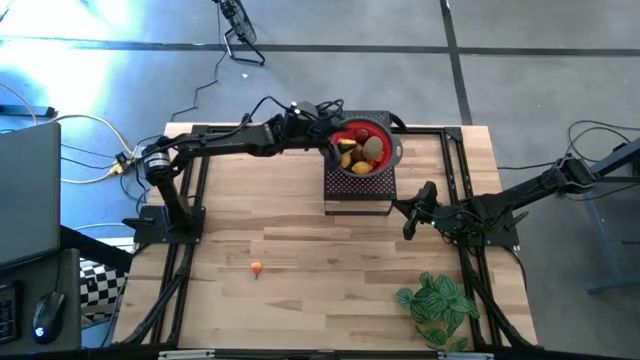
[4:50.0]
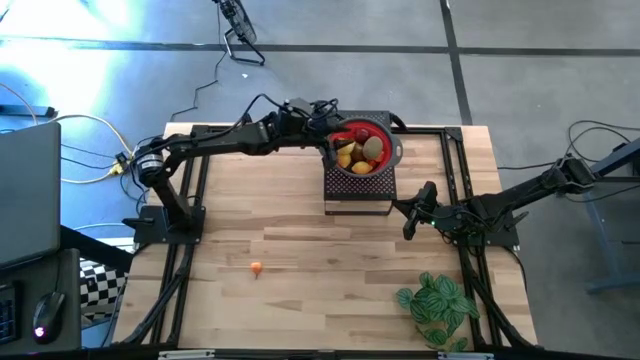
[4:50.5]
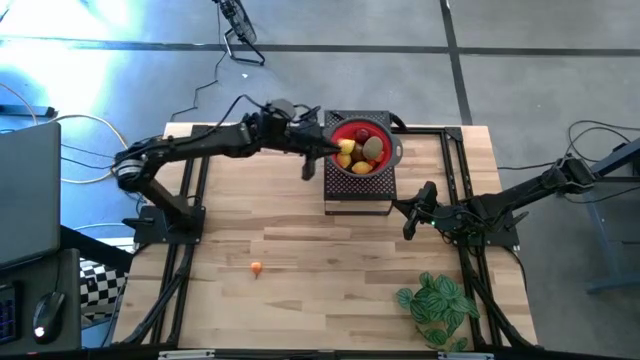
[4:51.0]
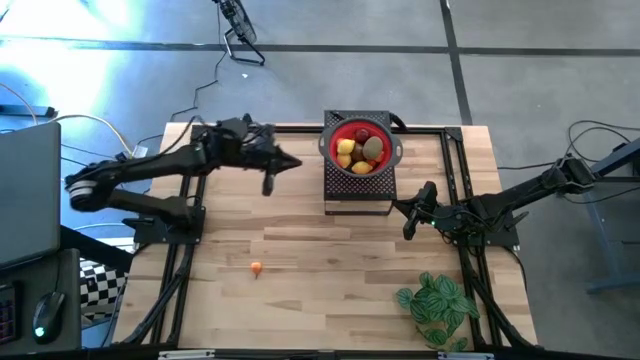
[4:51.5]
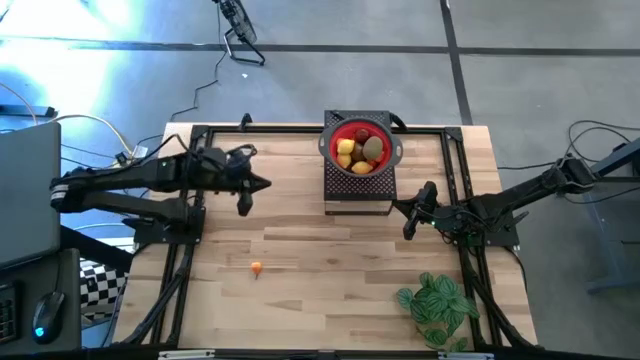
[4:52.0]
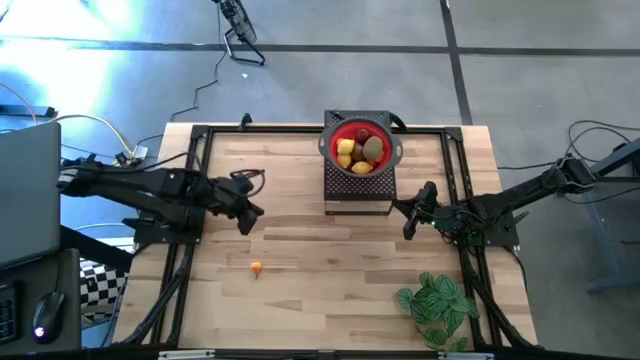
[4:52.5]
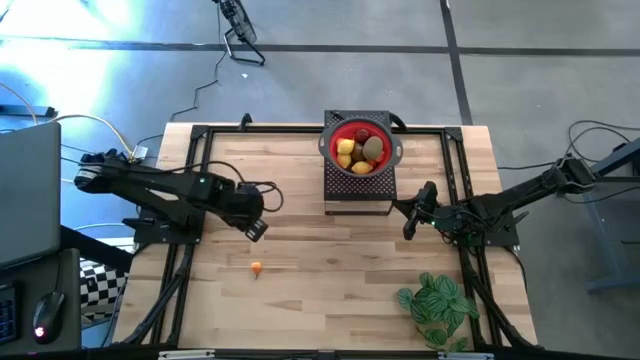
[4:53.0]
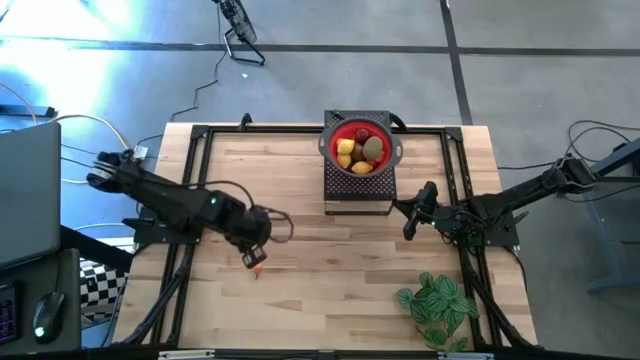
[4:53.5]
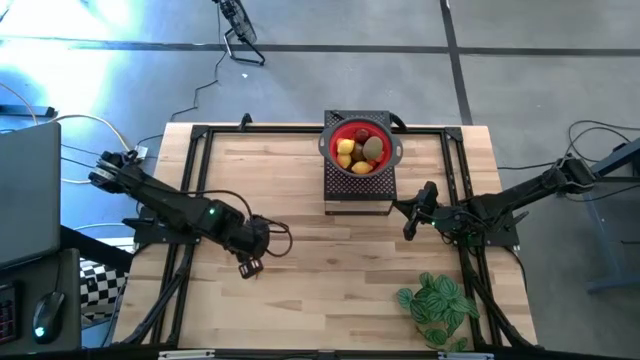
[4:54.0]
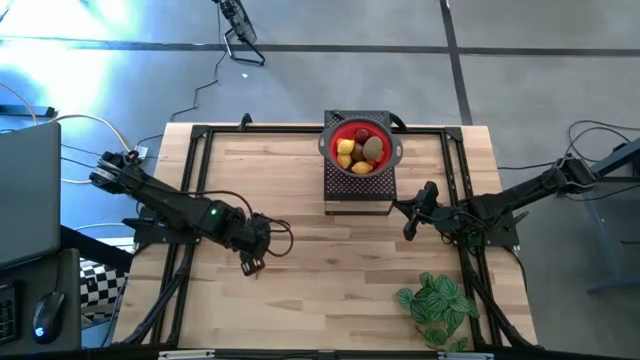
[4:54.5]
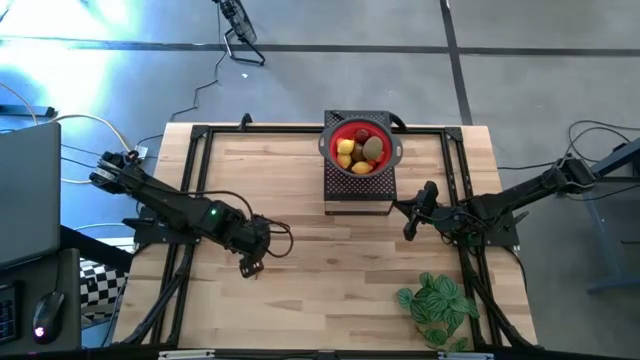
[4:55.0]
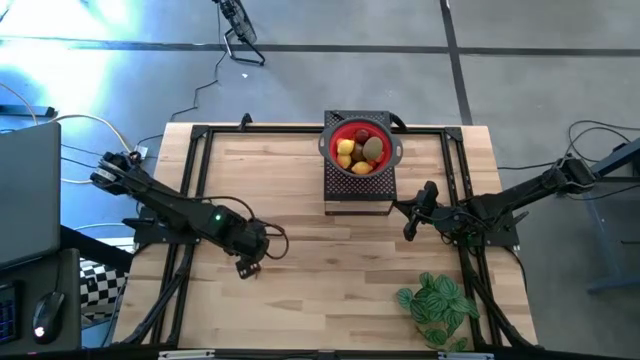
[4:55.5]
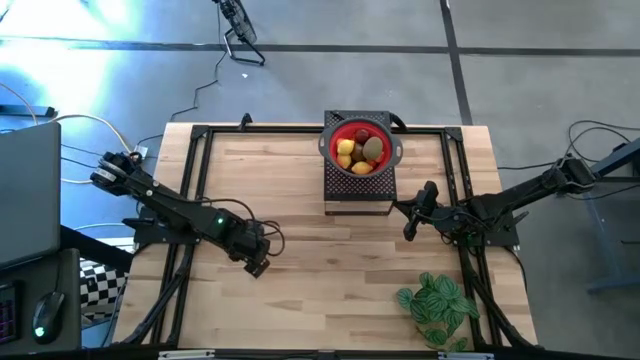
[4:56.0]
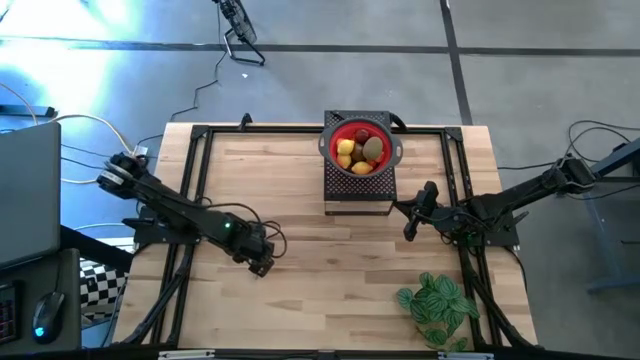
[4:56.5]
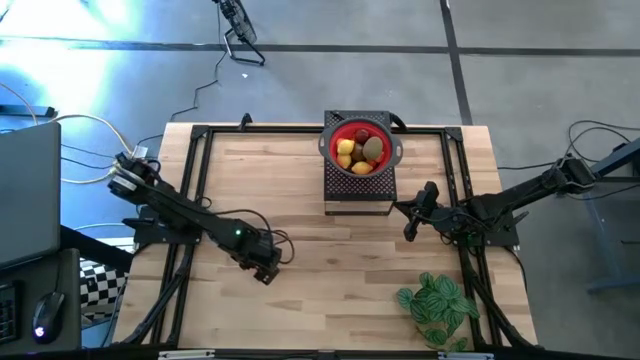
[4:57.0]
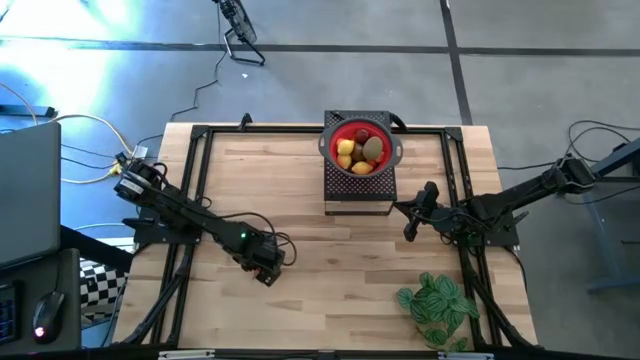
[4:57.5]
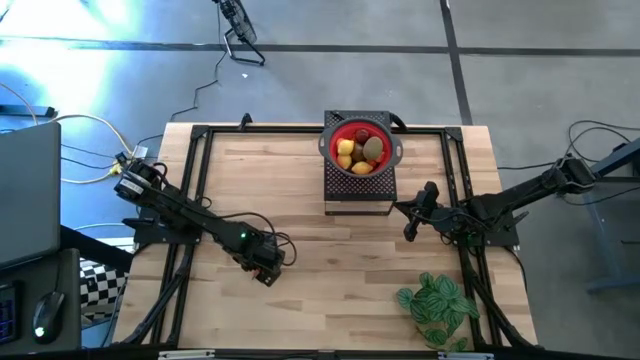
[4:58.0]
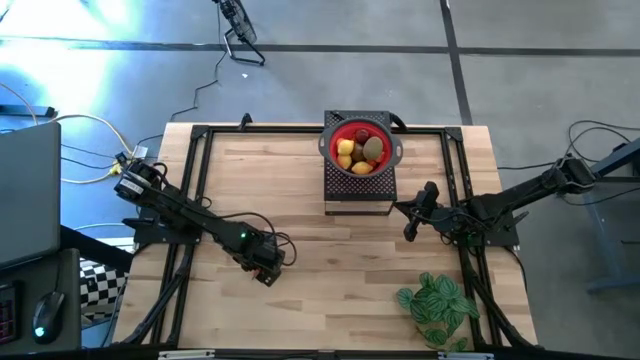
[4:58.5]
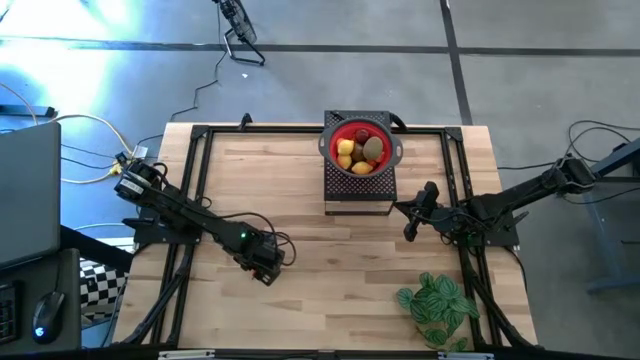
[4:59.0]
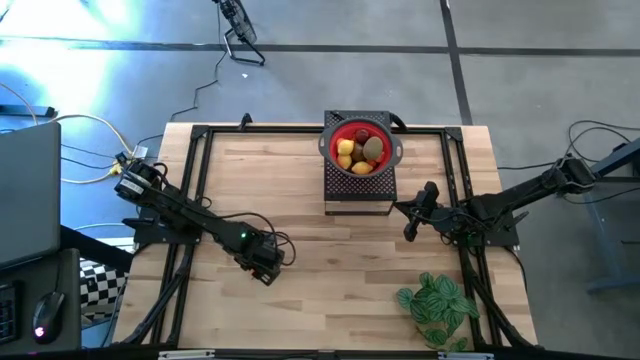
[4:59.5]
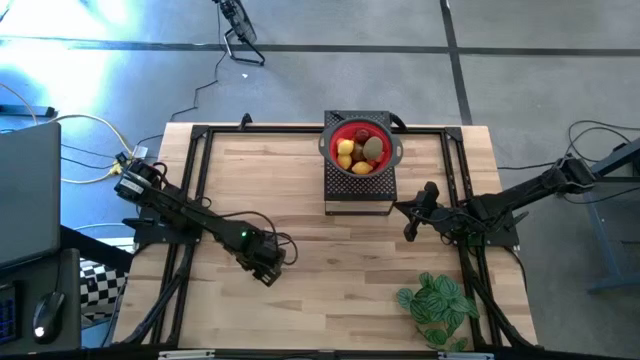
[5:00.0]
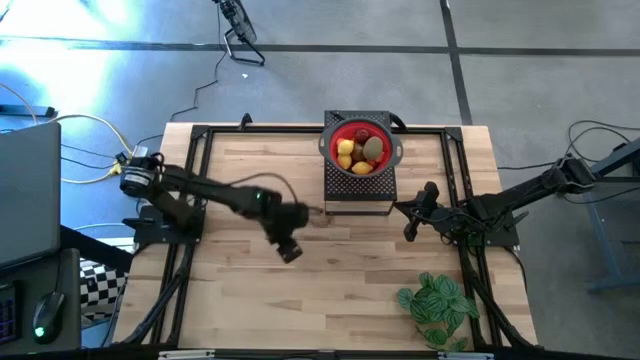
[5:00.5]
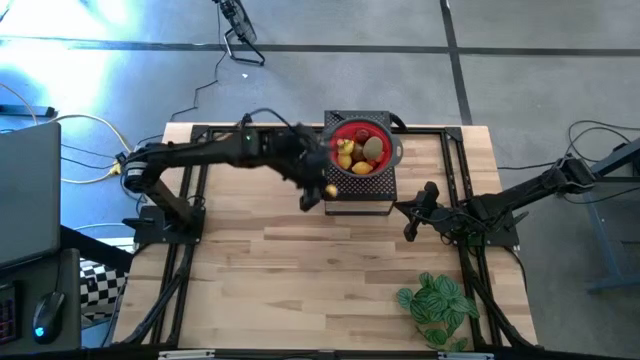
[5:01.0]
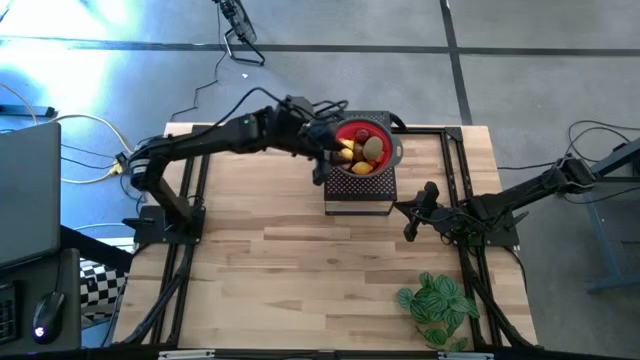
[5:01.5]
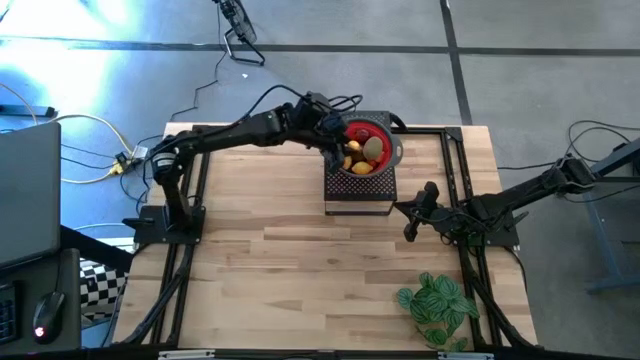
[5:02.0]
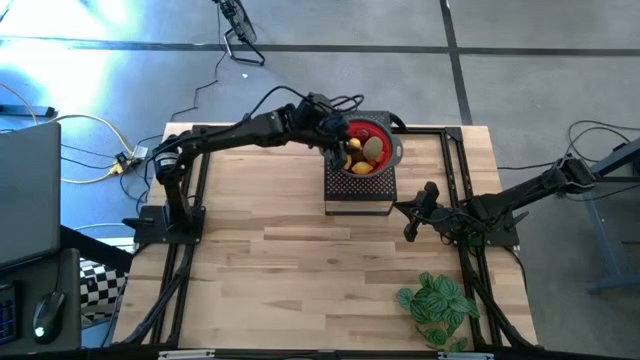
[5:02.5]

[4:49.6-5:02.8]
Task: Pick & Place Fruit
Put the orange pear into the red strainer bowl on the shelf

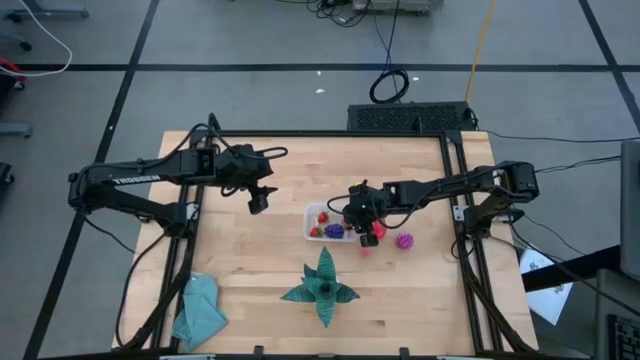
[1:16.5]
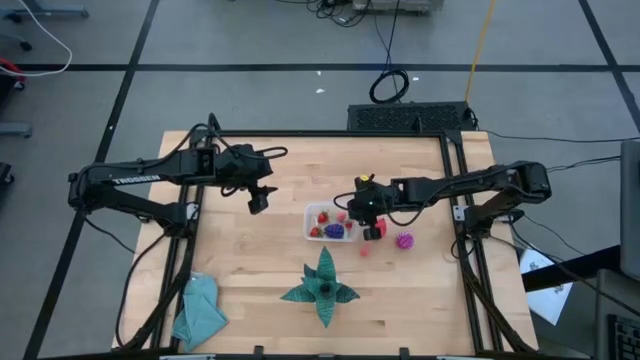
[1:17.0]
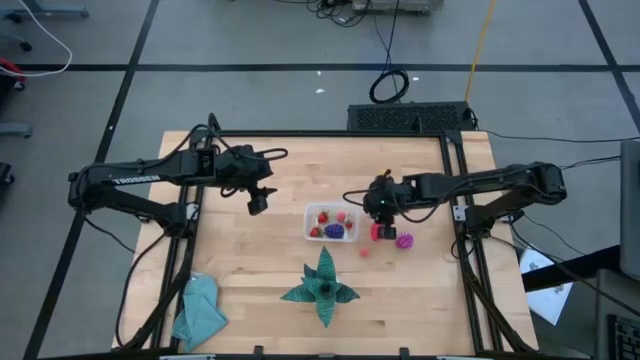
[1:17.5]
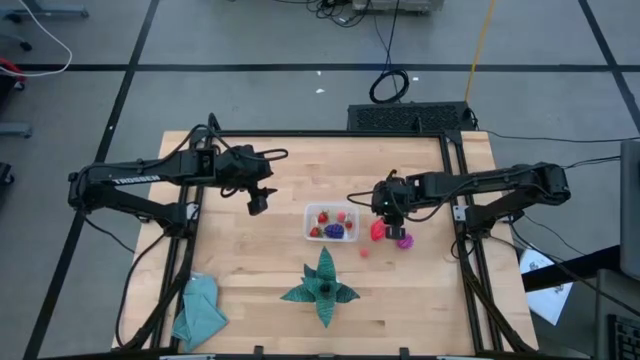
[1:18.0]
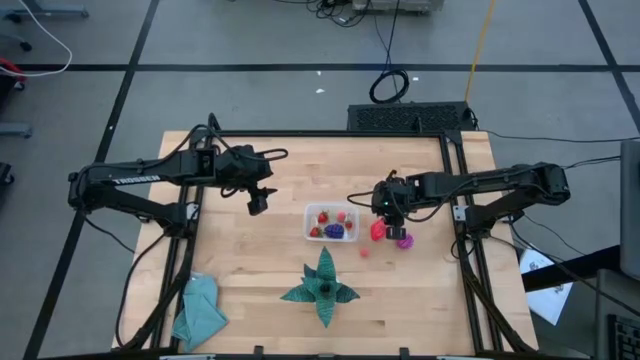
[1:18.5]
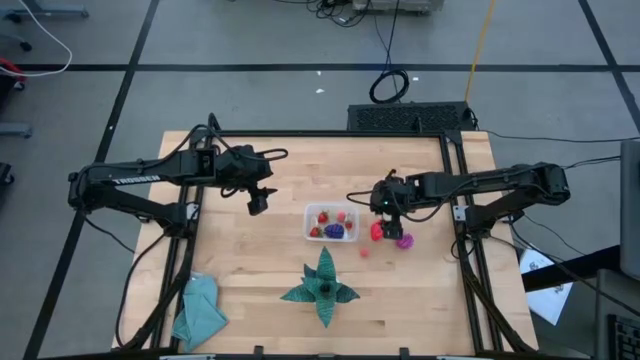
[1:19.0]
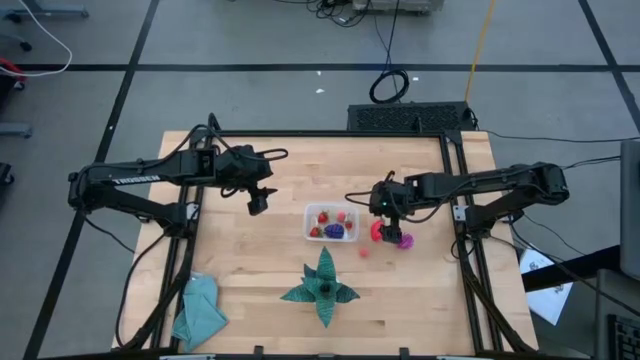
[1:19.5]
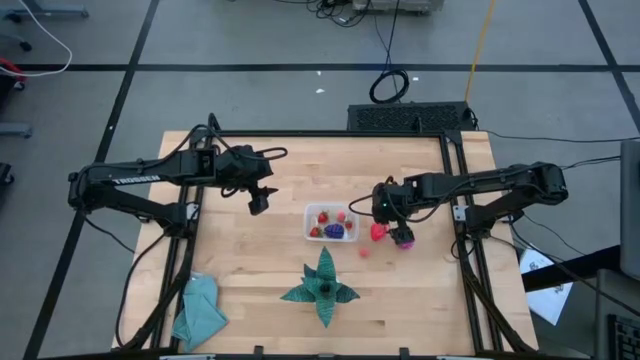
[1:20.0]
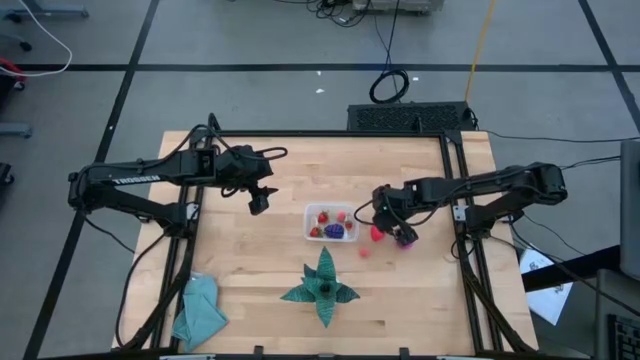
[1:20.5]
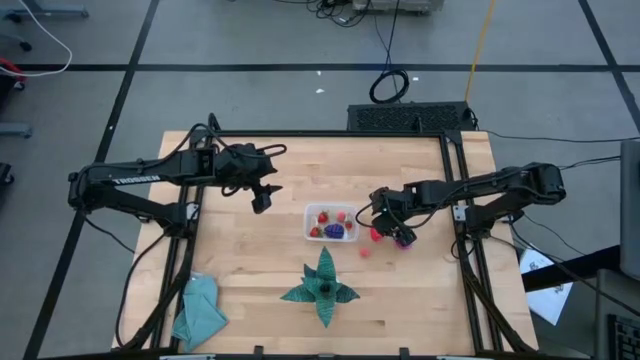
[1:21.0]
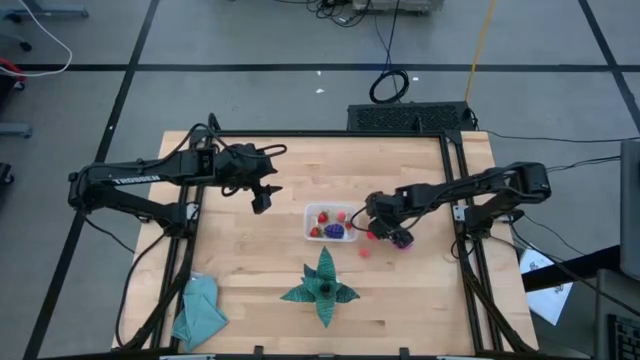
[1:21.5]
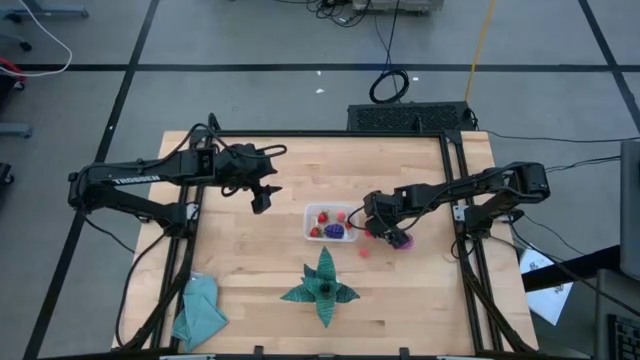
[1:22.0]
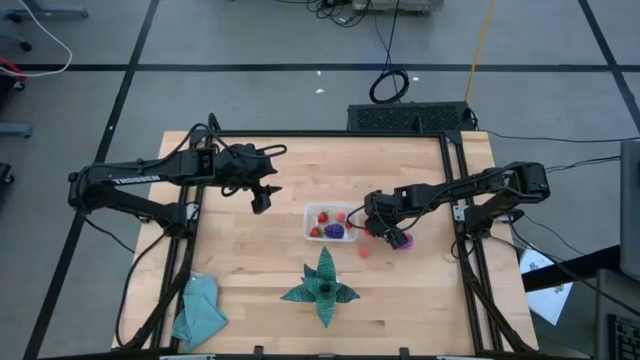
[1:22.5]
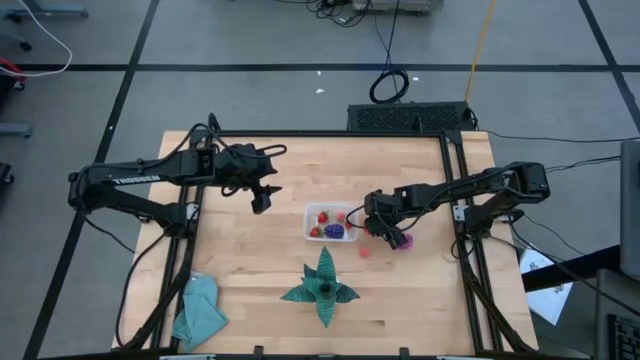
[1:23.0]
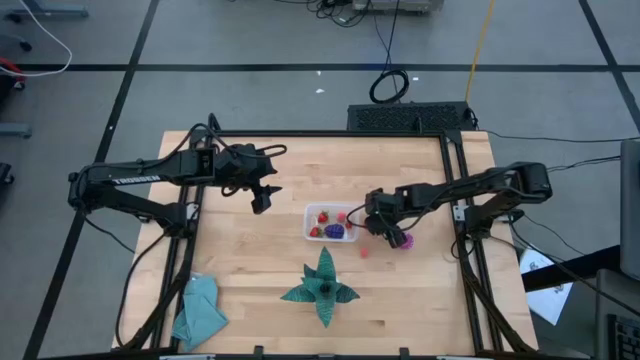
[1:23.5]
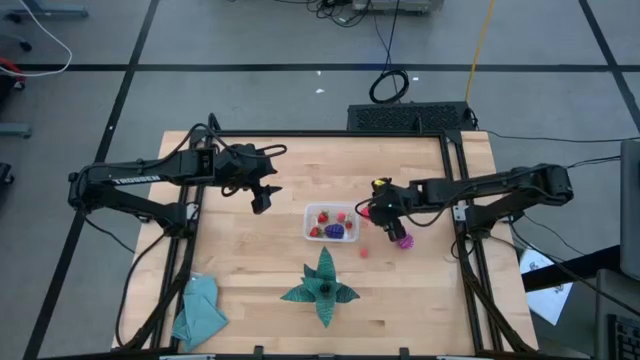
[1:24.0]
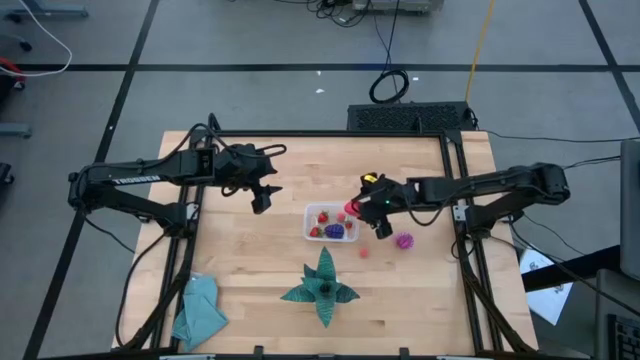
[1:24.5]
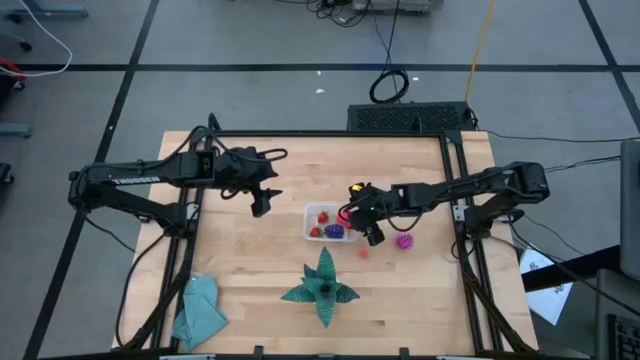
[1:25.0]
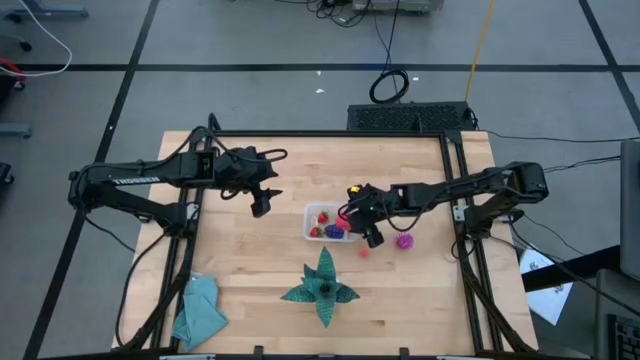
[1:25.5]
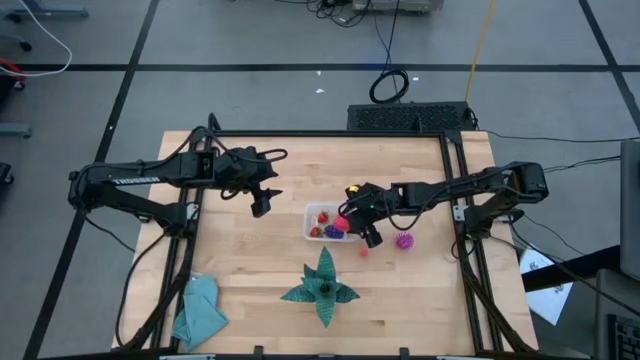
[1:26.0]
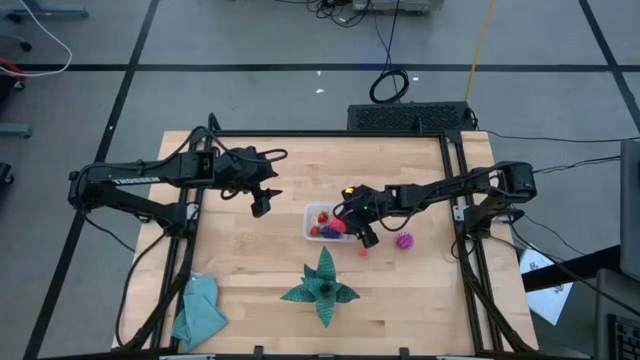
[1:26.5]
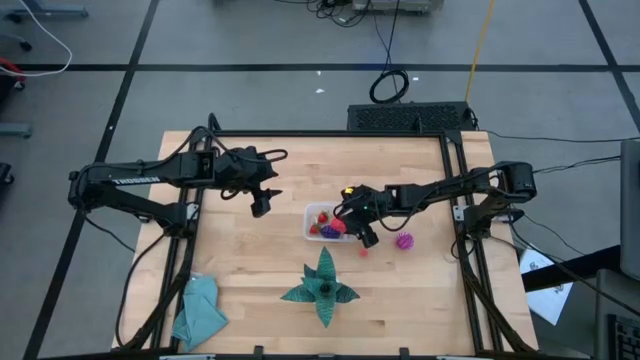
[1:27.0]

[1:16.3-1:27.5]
Task: Pick and placing Produce into tupperware
Put the pink dragon fruit into the transparent bin
